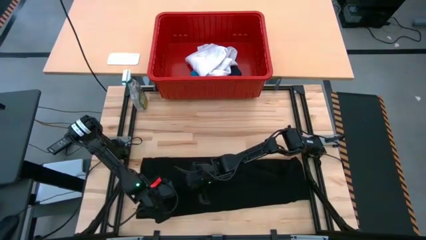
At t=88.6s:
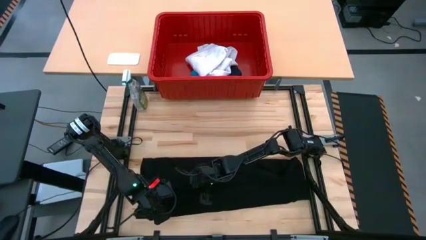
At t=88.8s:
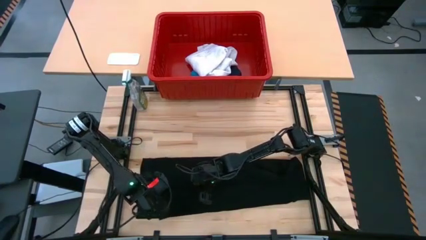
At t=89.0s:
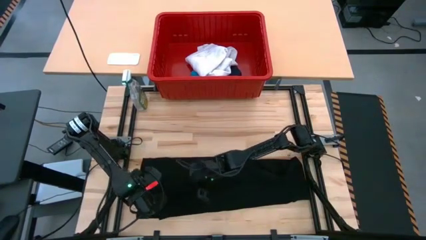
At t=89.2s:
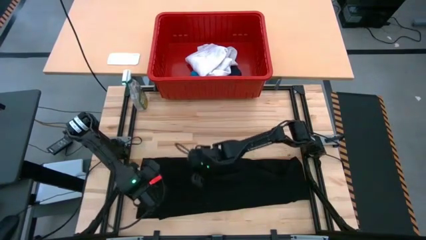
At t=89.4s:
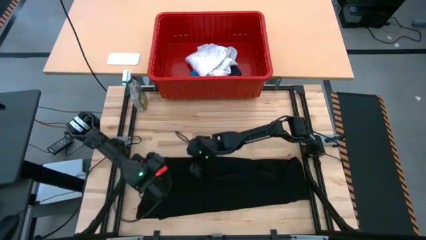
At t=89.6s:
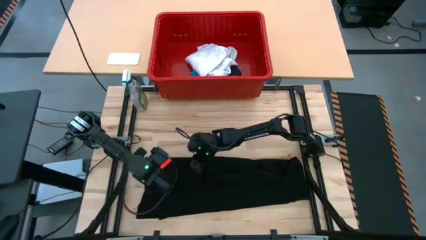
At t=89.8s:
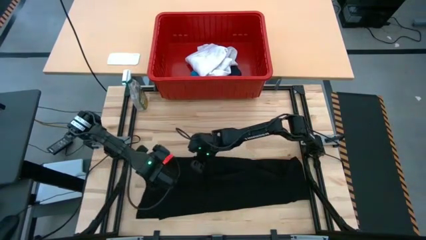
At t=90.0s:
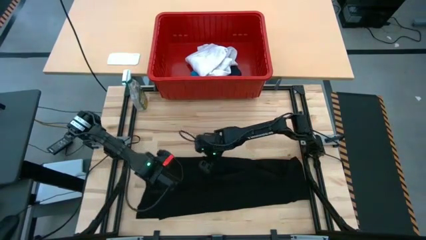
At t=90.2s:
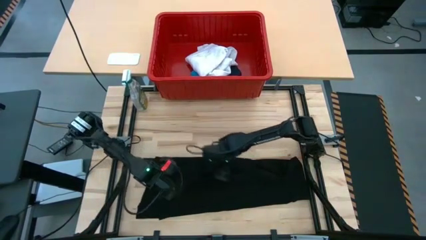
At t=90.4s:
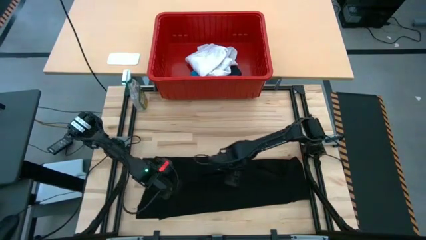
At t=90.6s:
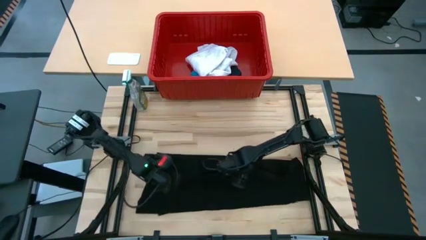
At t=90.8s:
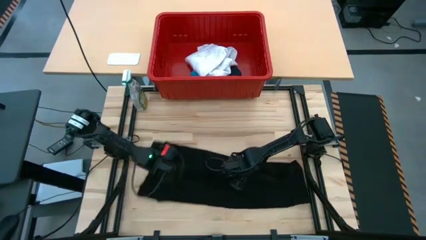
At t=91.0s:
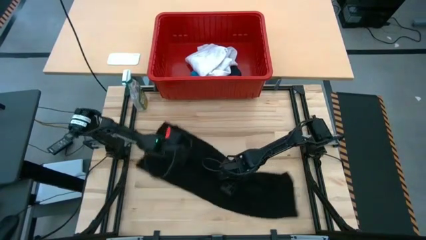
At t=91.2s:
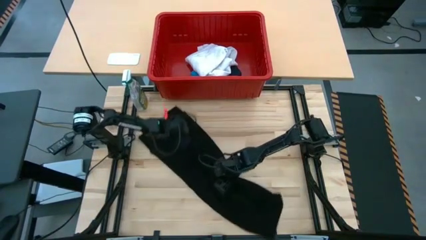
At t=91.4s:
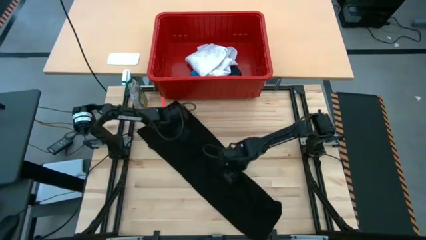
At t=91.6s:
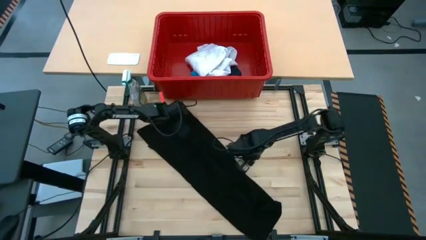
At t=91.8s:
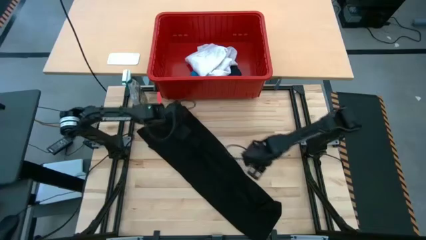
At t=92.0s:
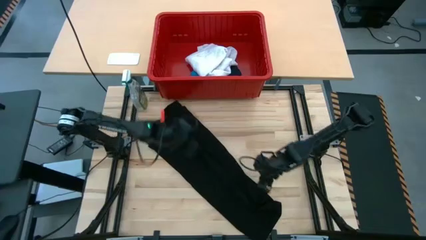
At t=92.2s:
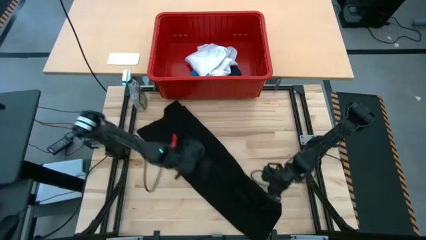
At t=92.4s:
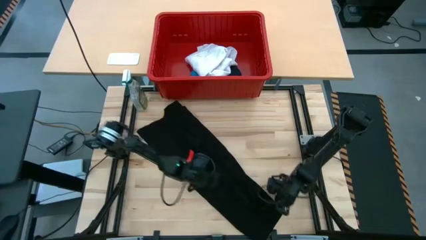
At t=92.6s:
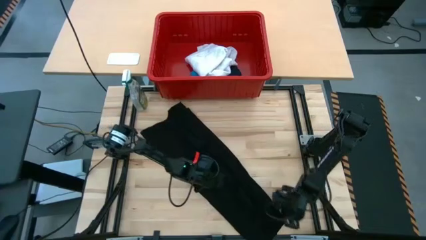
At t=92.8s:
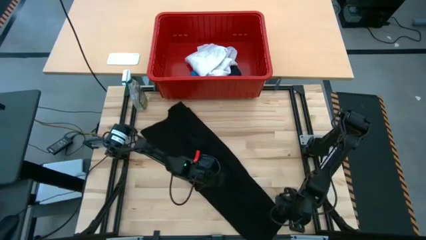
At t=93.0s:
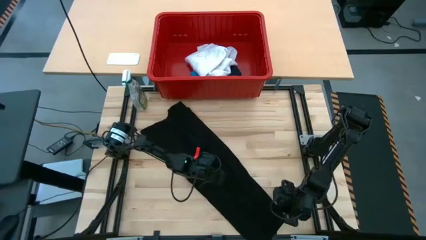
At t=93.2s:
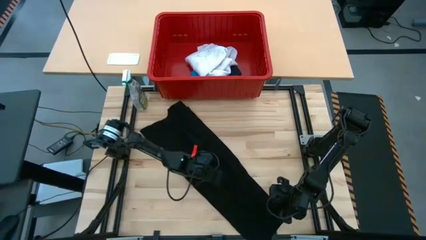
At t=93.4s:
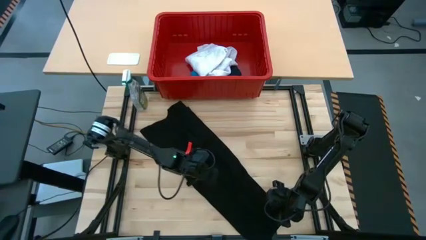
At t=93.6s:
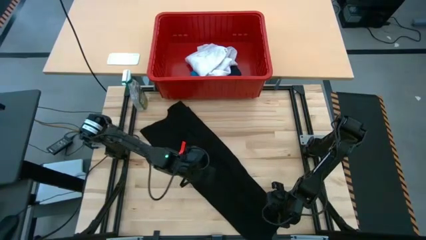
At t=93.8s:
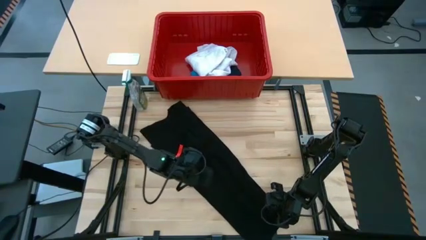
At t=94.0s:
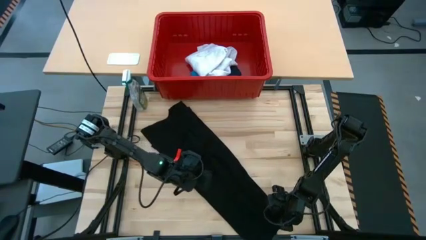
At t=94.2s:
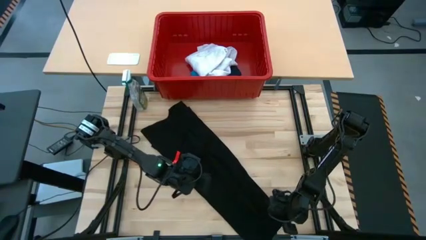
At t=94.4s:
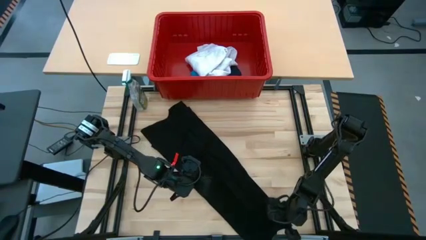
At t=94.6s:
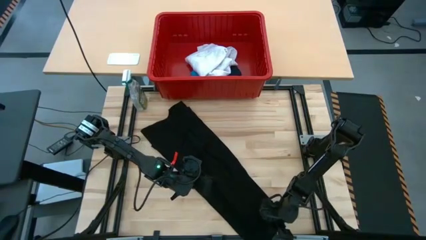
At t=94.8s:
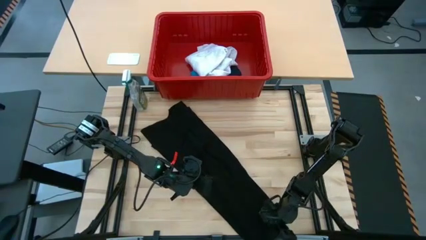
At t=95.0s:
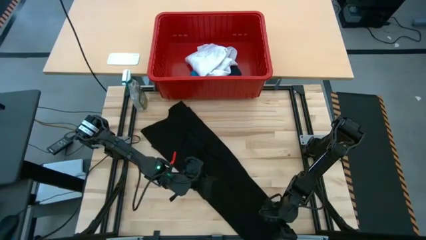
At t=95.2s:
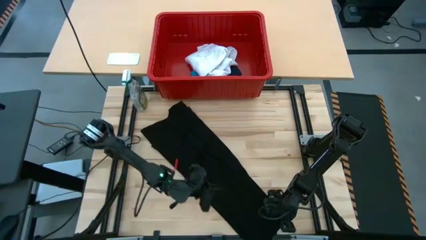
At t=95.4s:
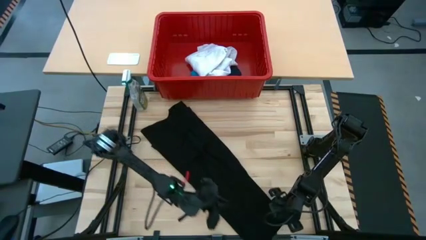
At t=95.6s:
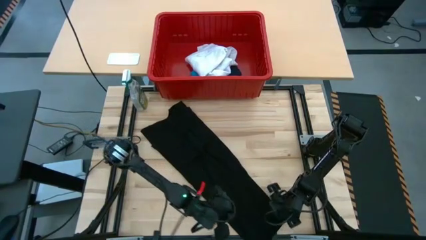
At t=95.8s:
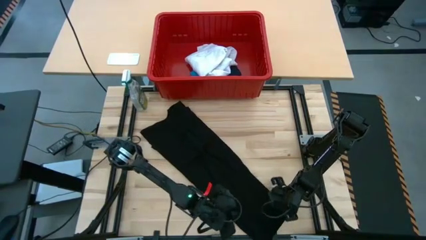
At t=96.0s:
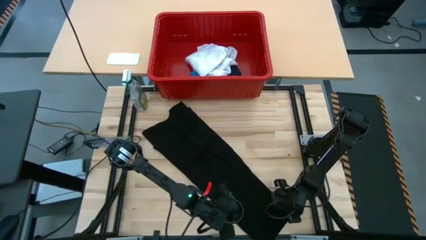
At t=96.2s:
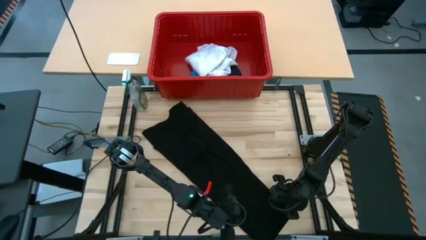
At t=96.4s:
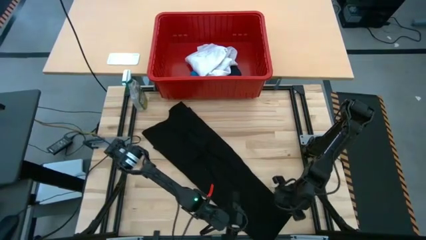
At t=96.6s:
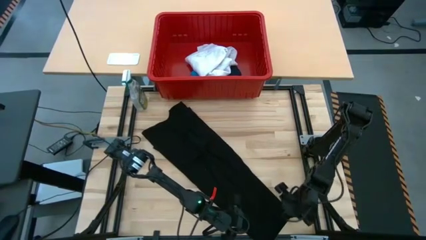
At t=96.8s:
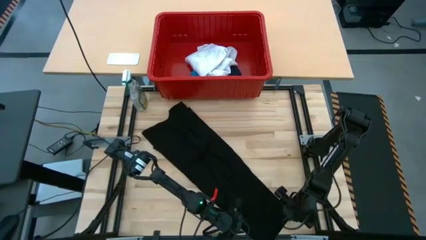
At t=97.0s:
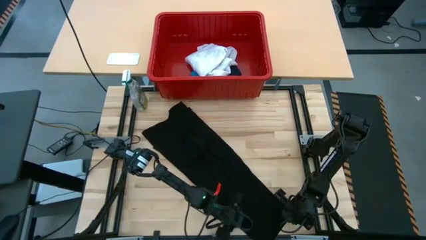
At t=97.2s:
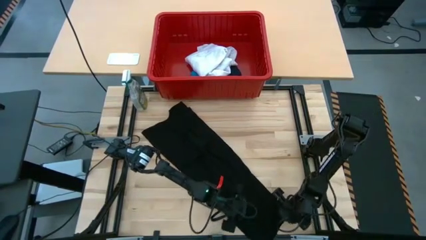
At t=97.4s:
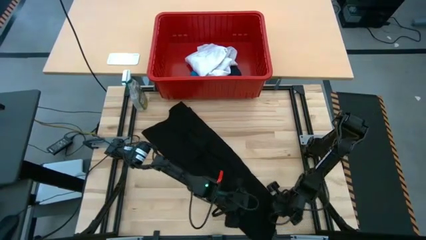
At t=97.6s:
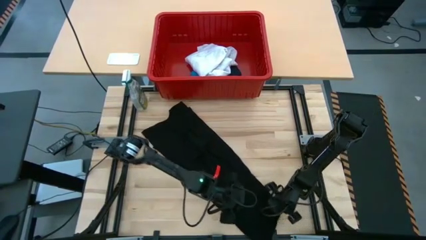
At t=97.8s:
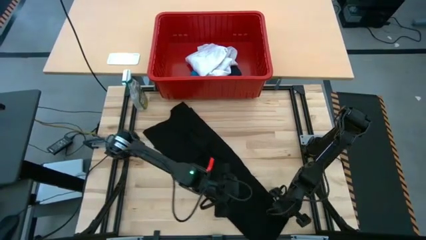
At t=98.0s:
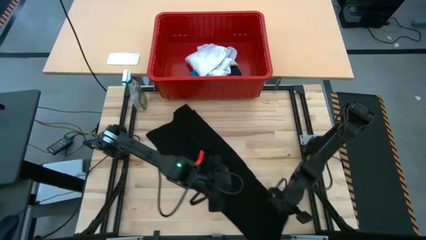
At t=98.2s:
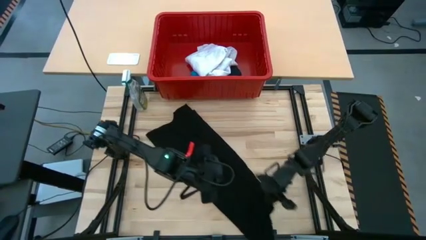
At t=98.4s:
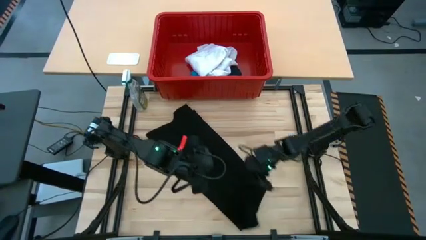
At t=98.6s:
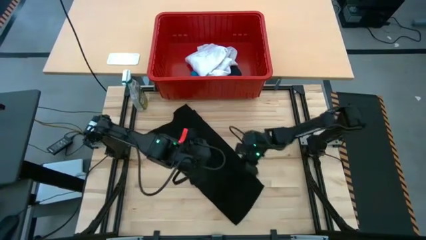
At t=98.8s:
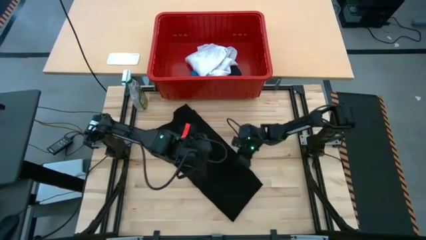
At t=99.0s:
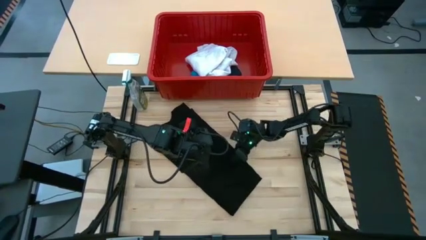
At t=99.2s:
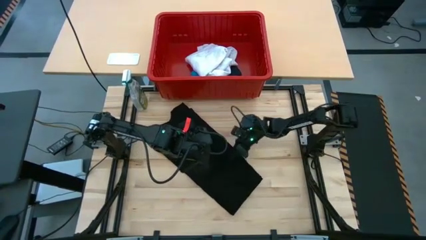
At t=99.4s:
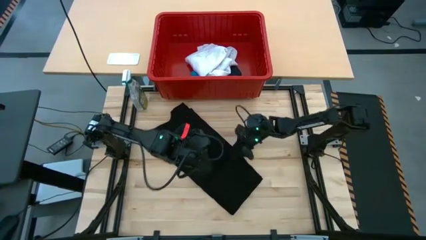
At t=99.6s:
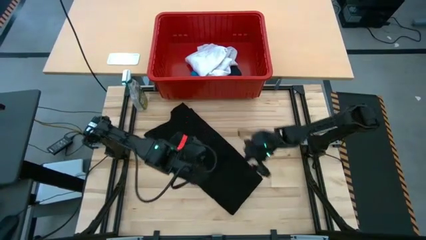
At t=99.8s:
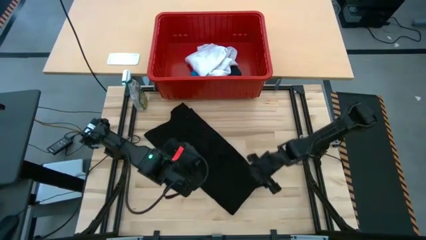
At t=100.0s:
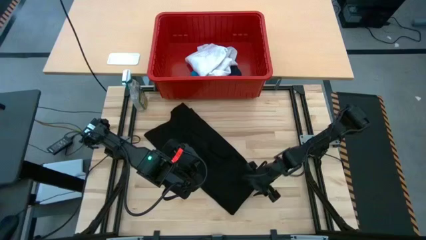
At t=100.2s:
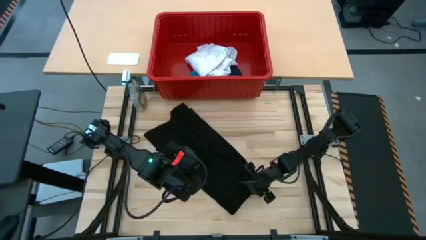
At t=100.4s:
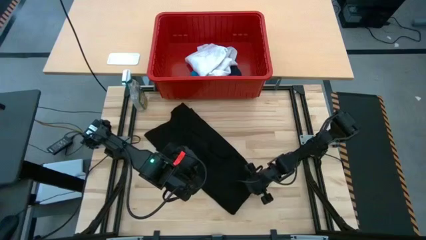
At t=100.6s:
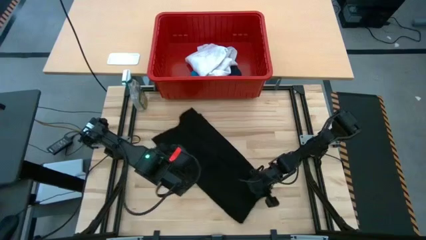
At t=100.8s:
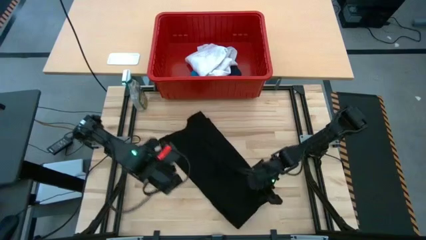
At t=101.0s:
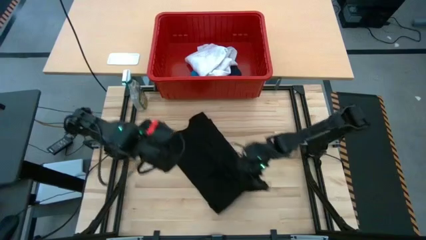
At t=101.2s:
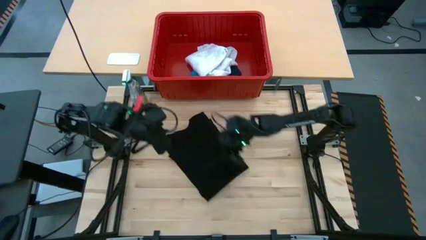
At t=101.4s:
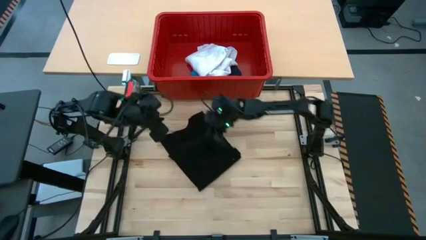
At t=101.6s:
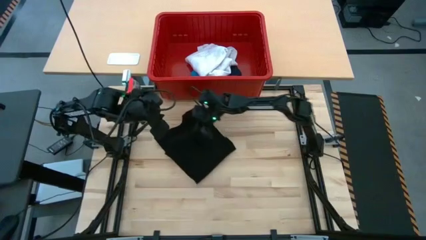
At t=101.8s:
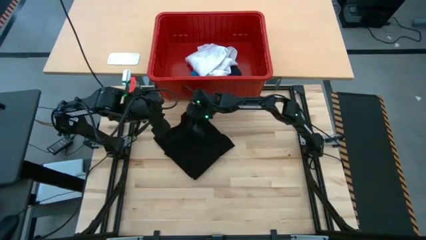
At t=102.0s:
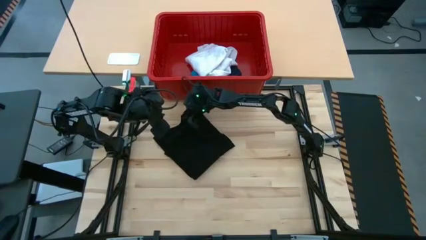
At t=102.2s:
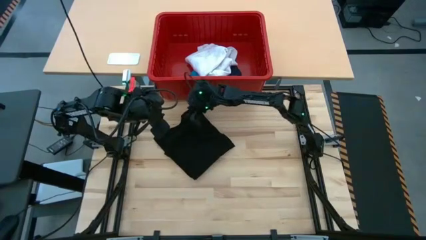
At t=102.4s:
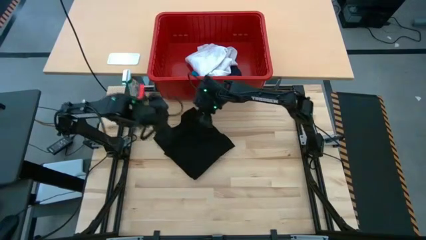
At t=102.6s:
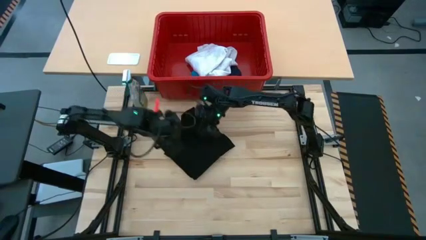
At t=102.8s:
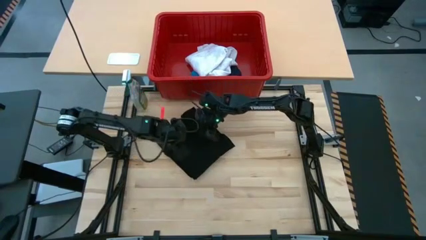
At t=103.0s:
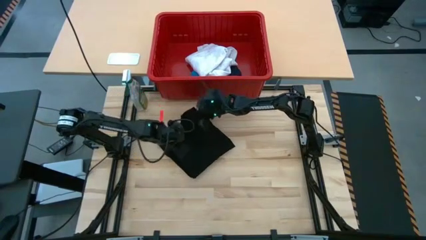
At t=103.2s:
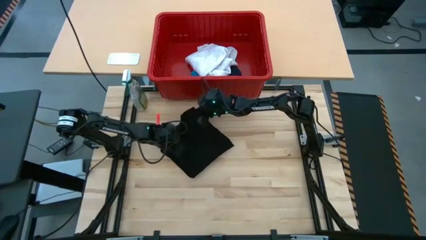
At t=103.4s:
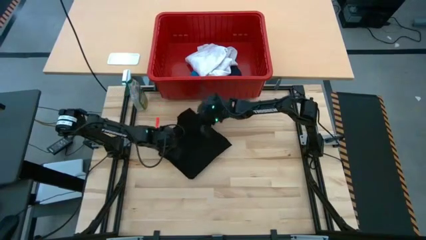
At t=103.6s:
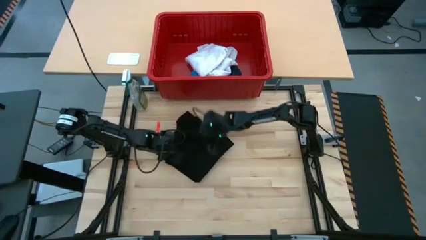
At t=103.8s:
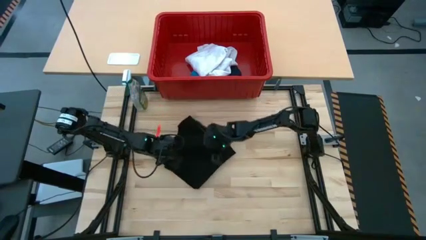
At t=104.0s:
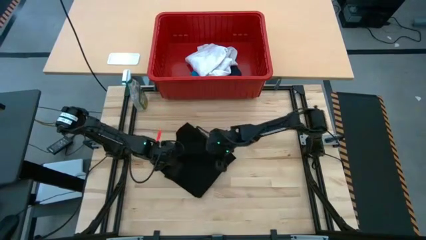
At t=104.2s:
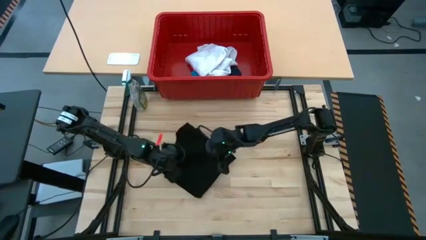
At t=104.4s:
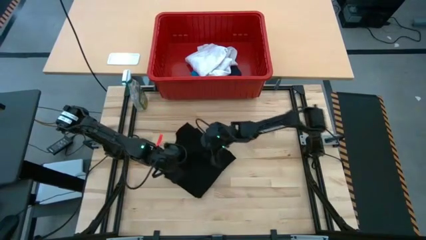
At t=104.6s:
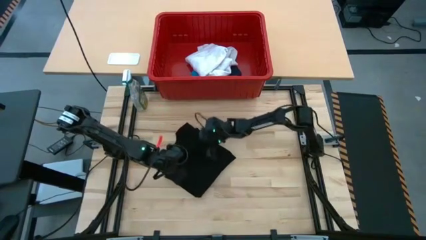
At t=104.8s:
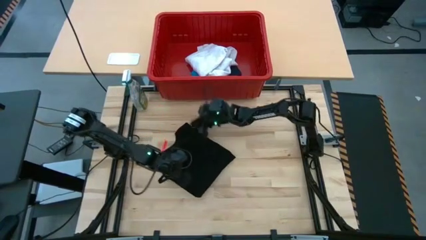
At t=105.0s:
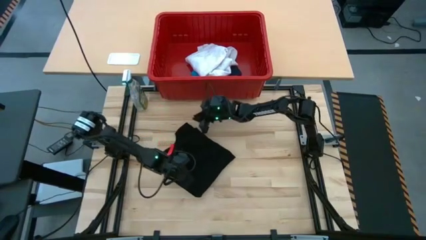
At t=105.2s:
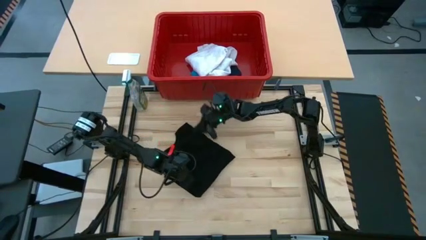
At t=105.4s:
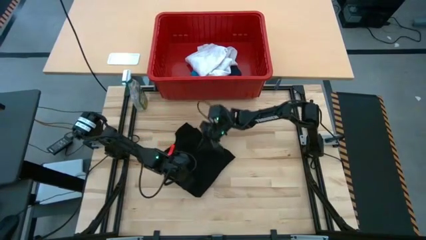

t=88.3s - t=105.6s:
Task: Fold laundry
Fold the black shirt on the table
